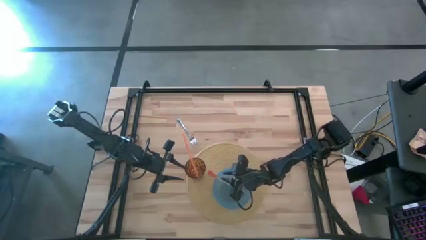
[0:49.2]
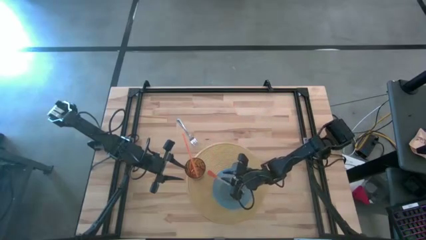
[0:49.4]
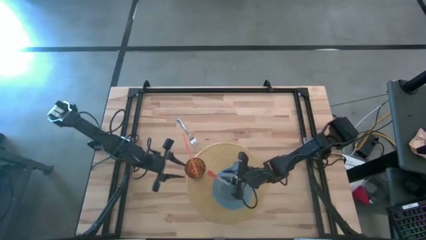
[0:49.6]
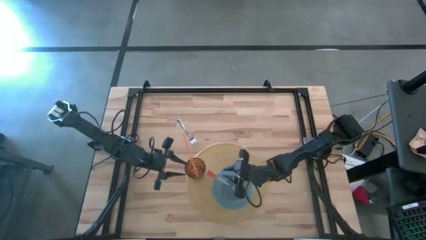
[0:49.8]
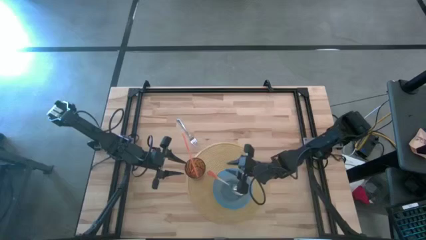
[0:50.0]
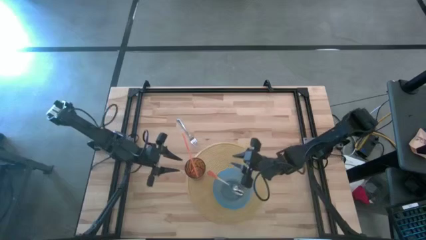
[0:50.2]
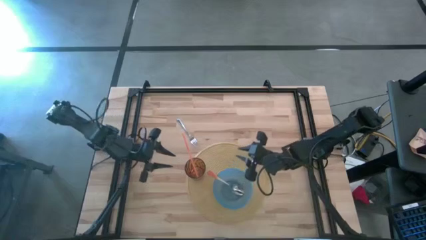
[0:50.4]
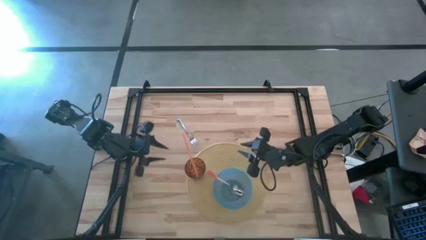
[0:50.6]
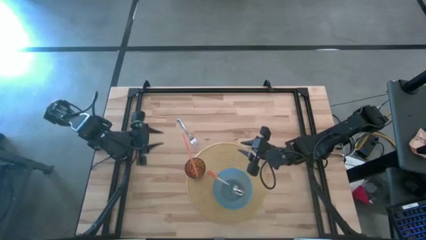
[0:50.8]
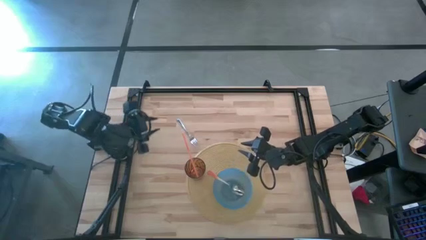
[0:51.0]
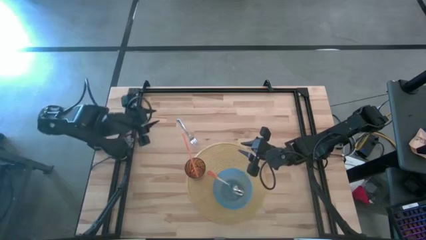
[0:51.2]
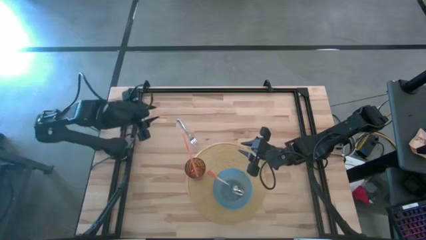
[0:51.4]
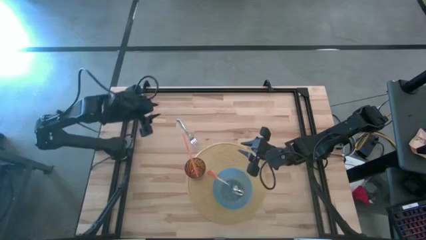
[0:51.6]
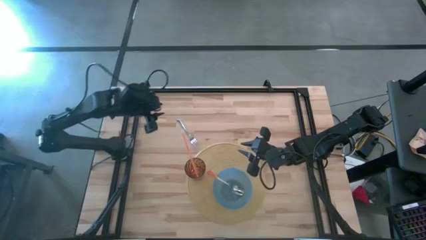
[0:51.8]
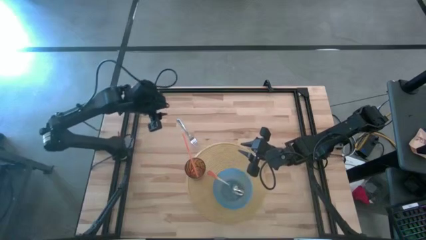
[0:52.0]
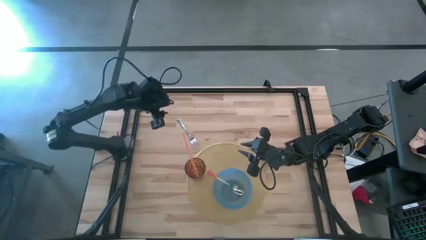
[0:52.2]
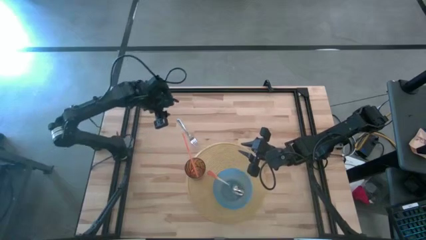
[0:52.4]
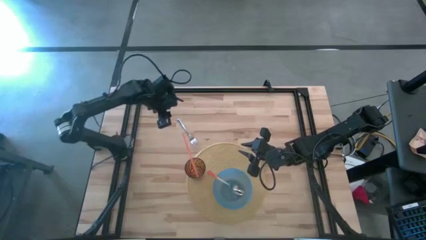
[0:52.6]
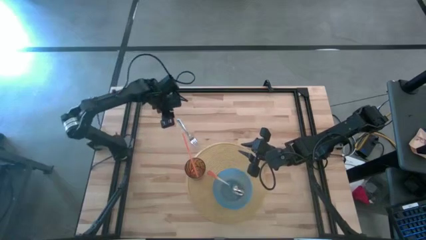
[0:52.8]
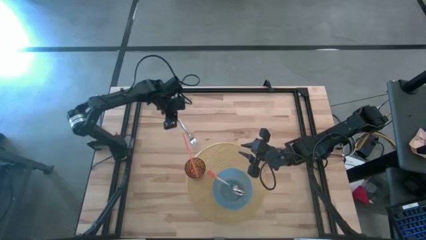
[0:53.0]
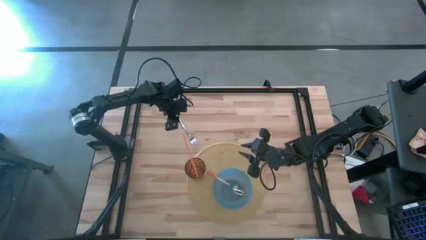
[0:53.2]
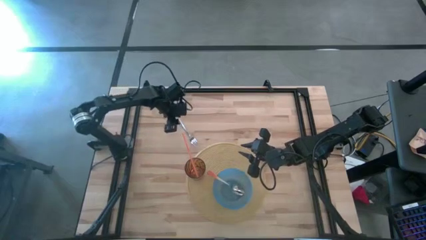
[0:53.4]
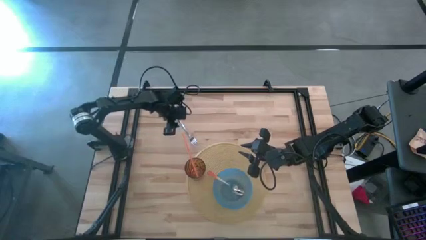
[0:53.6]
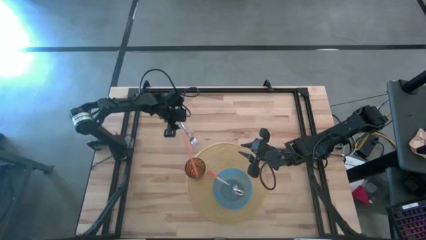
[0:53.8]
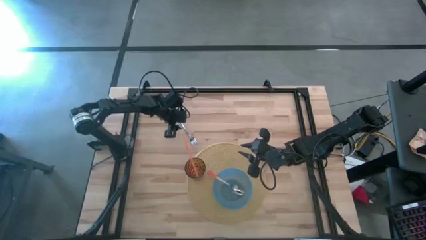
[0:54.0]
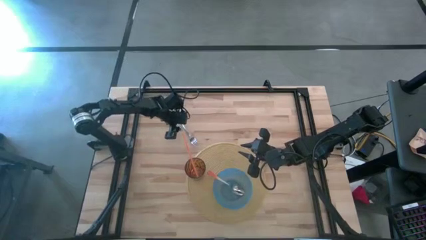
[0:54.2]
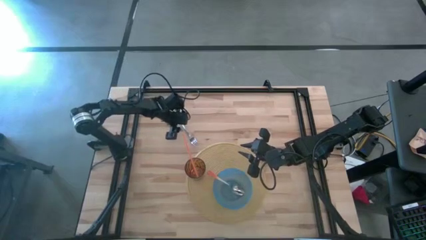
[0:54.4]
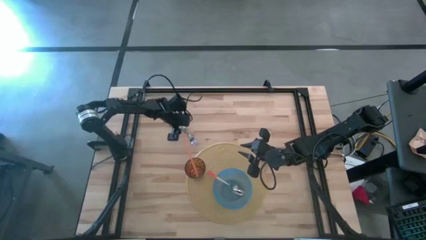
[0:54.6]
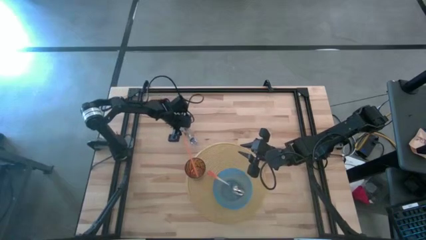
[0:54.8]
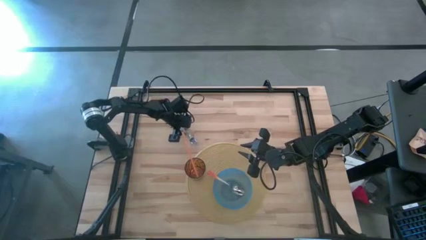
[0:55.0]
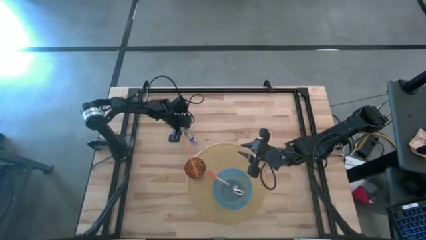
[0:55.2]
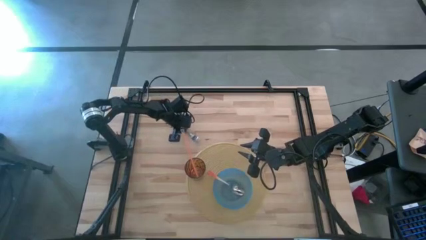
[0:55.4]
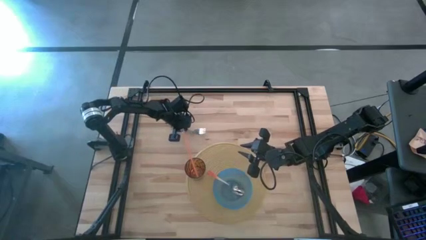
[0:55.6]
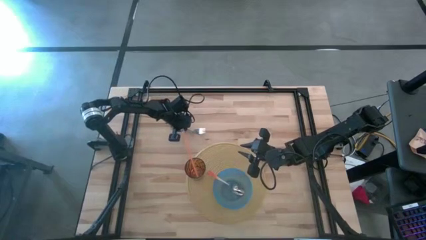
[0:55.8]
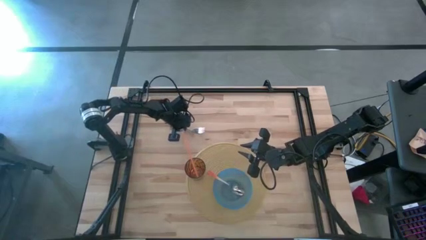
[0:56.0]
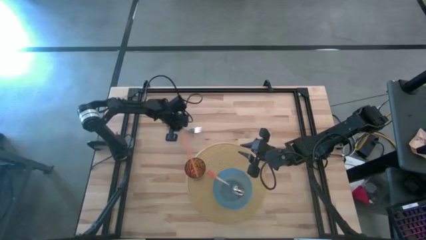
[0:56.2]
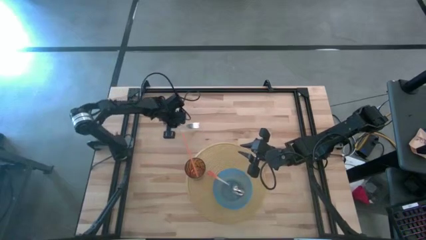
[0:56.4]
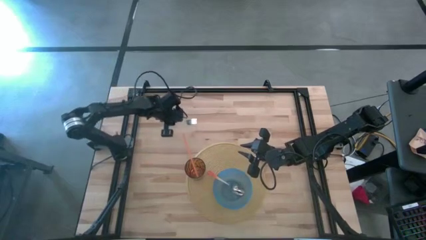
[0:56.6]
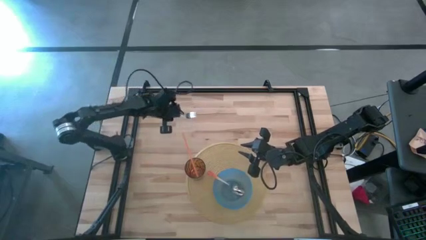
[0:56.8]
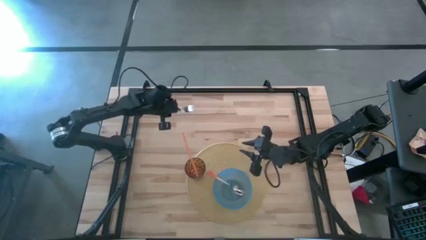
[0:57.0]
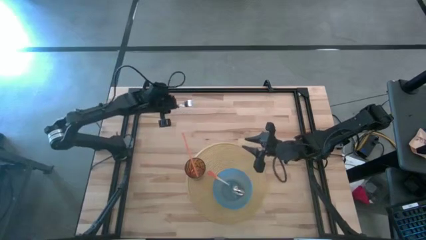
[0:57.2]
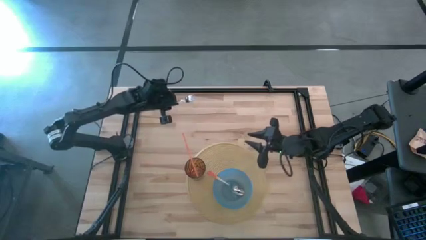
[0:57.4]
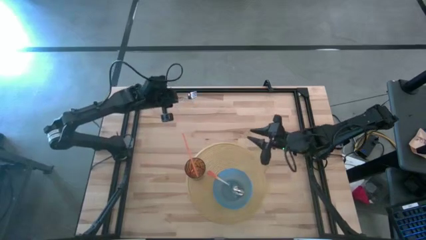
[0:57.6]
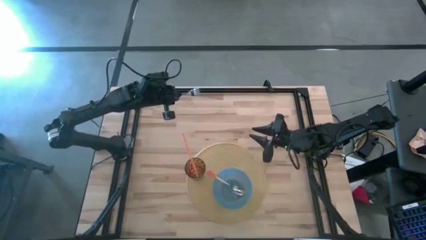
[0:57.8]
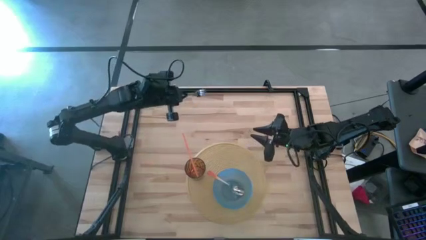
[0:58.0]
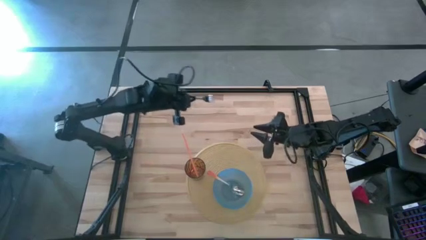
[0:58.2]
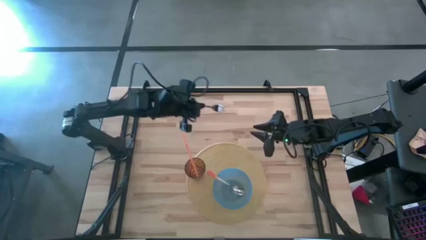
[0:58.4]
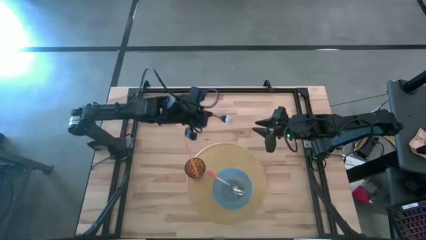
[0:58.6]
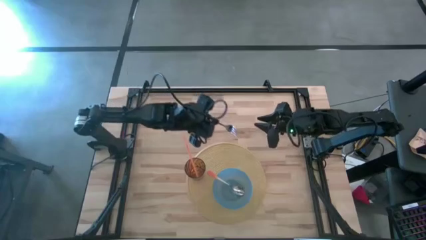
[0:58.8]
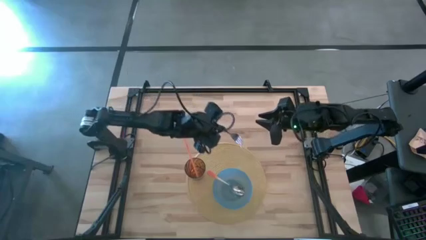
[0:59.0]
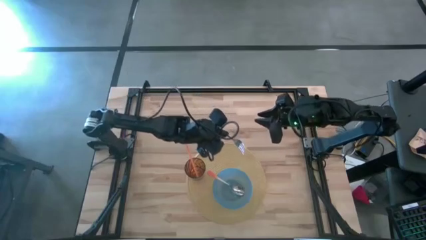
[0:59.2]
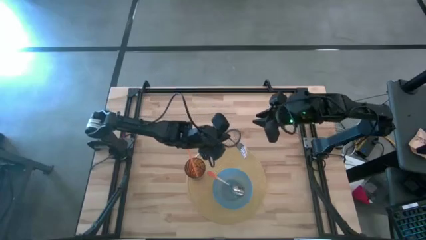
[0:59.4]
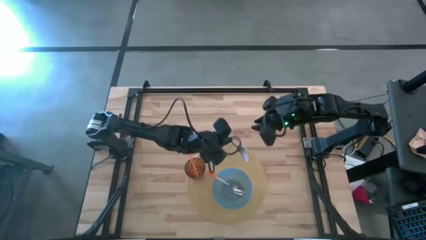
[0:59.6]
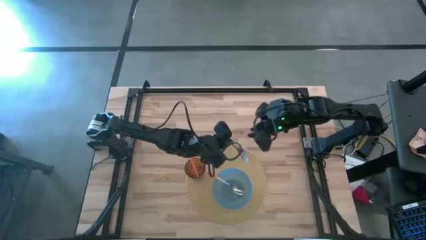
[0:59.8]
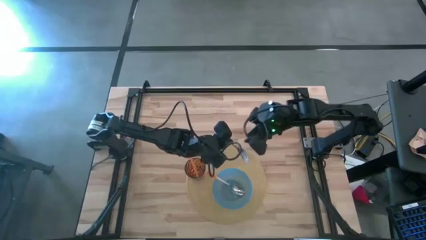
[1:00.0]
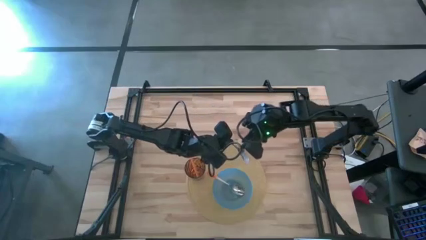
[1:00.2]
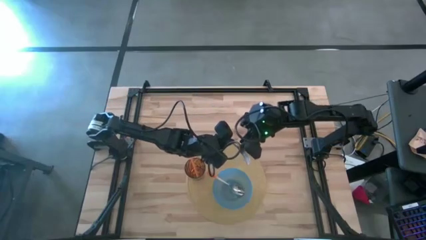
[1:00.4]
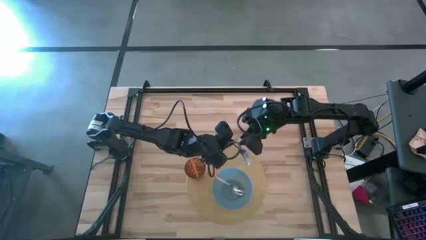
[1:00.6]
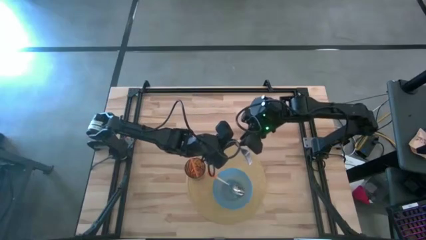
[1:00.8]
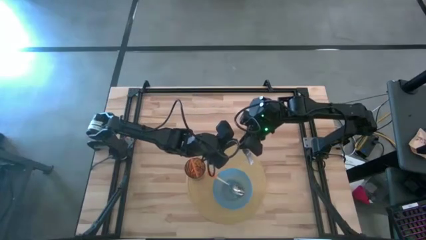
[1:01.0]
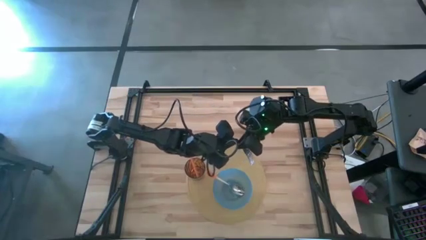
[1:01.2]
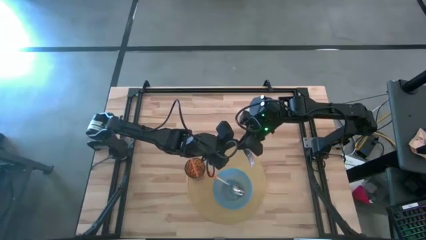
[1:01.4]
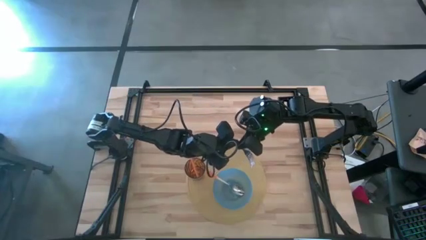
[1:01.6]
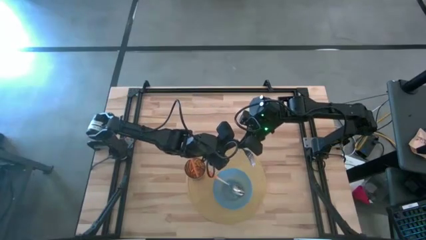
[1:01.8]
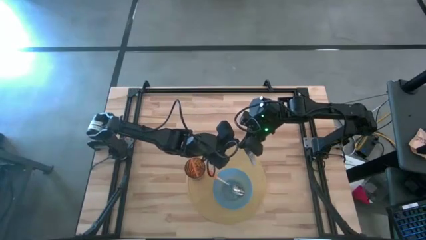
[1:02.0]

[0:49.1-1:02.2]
Task: Pick & Place Utensil
Put the silver fork to the right of the orange spoon in the blue bowl on the brown mat
